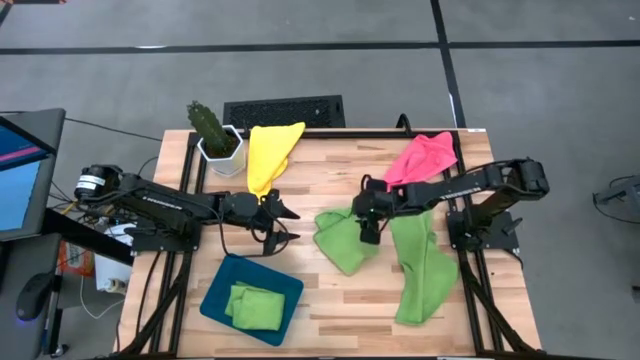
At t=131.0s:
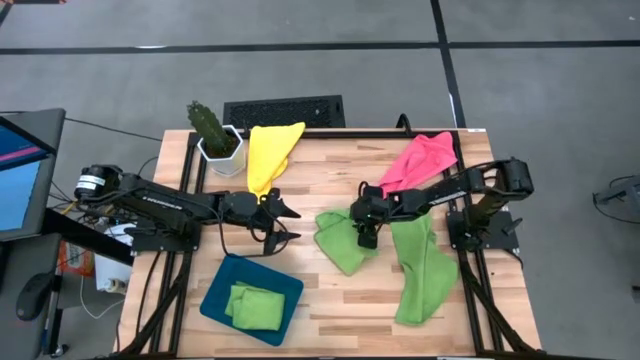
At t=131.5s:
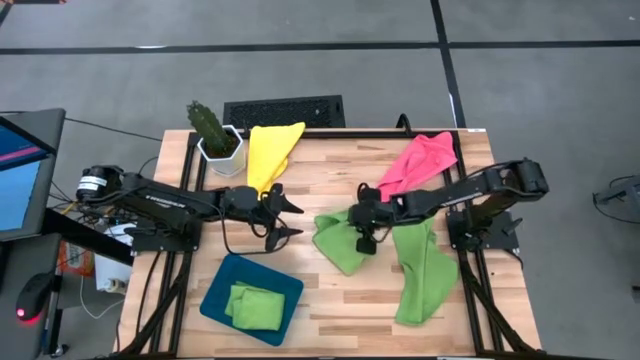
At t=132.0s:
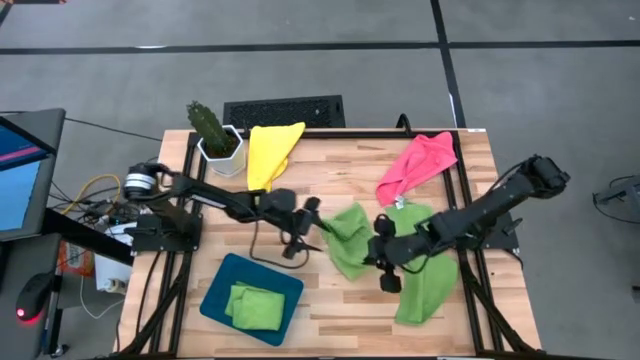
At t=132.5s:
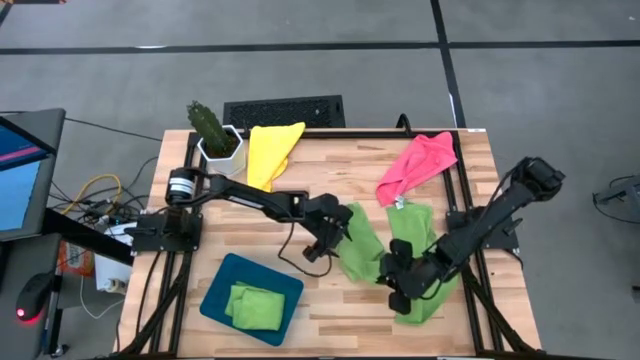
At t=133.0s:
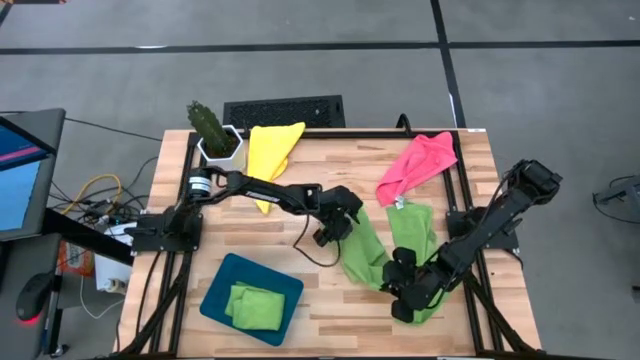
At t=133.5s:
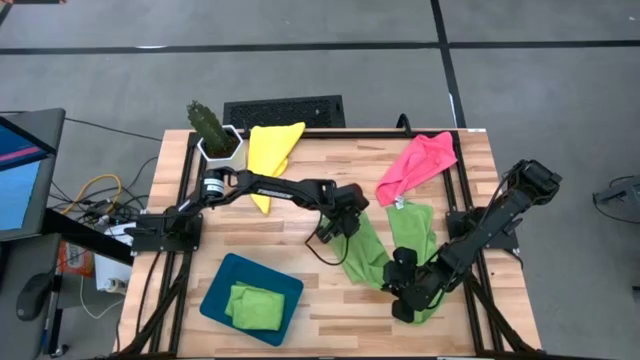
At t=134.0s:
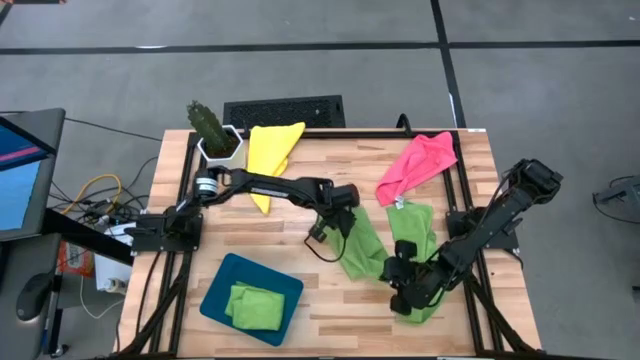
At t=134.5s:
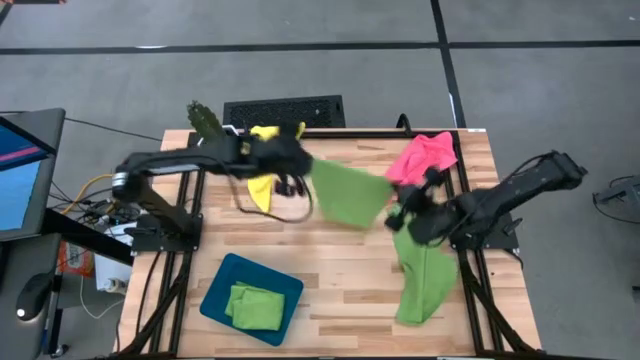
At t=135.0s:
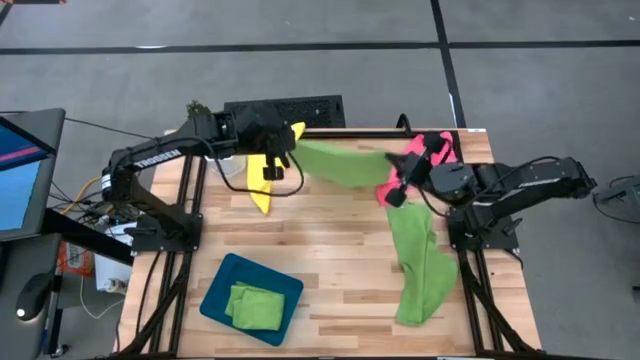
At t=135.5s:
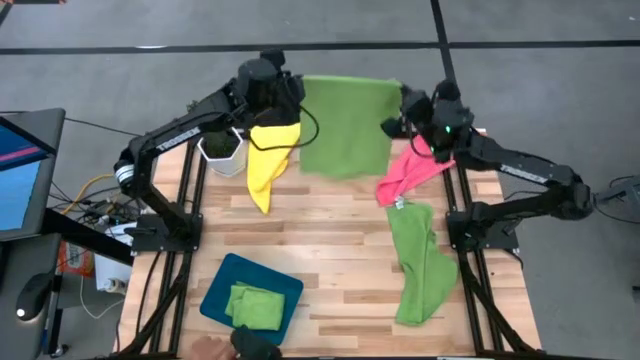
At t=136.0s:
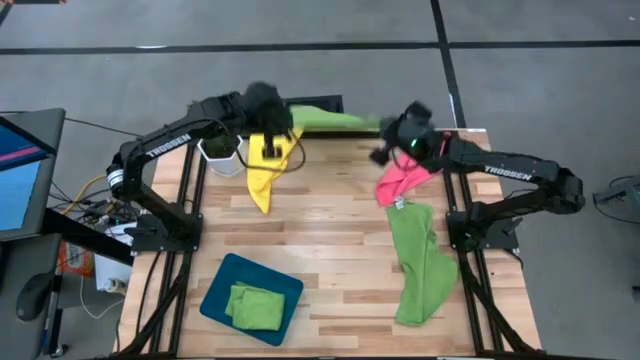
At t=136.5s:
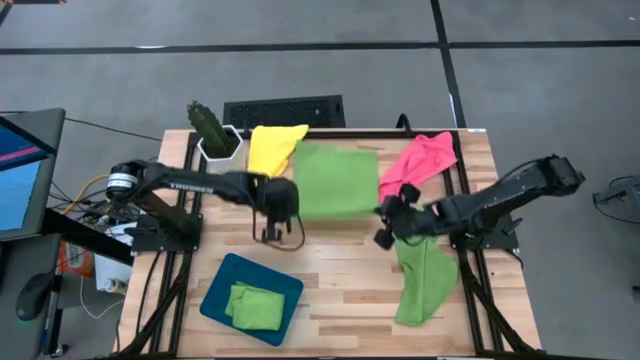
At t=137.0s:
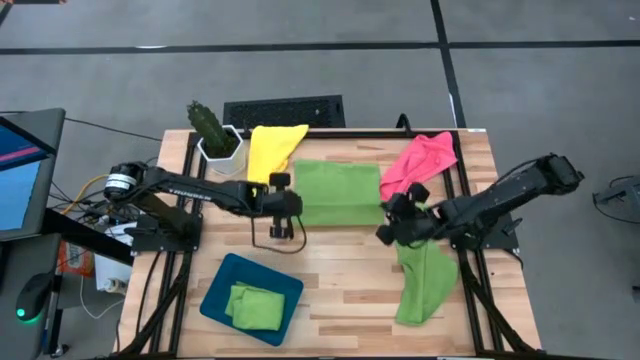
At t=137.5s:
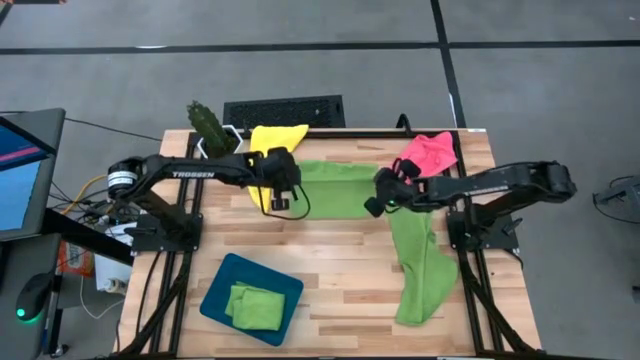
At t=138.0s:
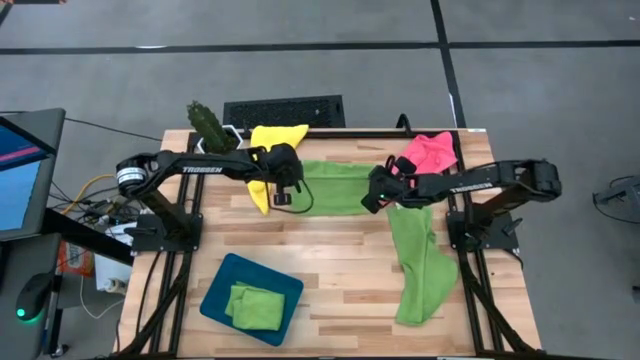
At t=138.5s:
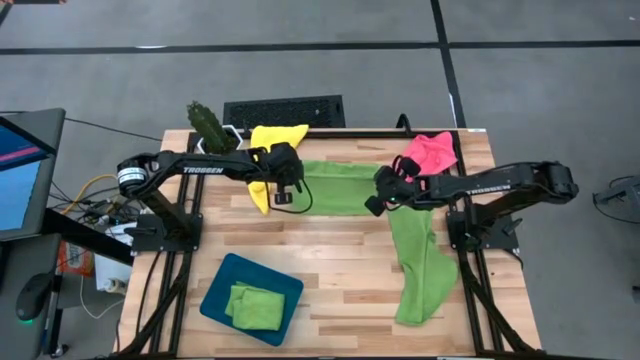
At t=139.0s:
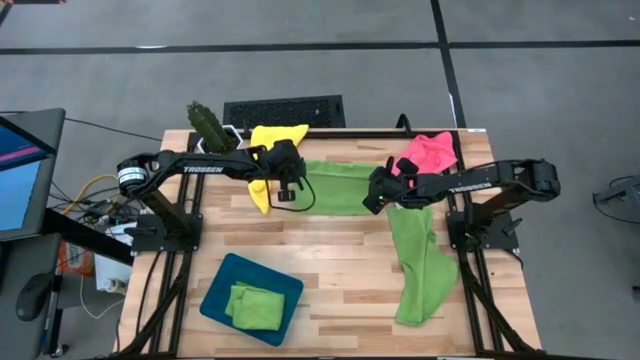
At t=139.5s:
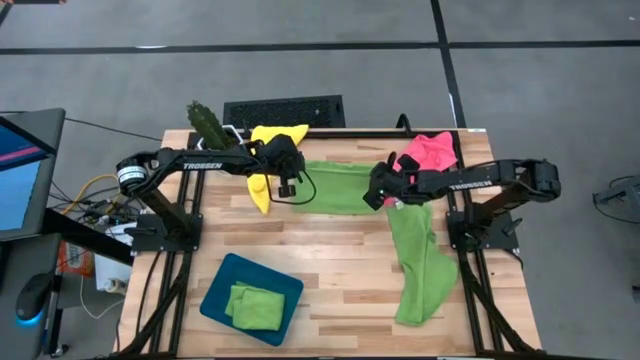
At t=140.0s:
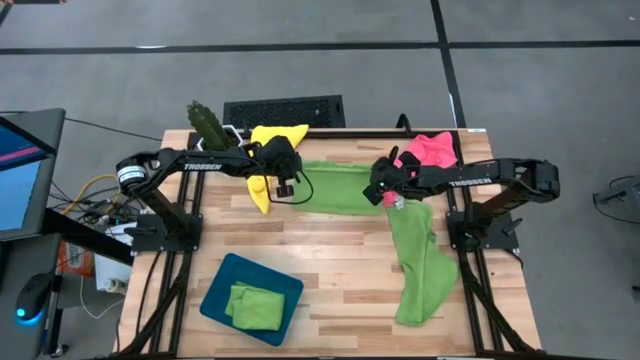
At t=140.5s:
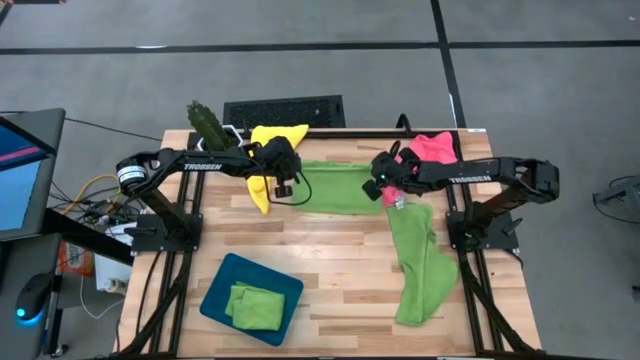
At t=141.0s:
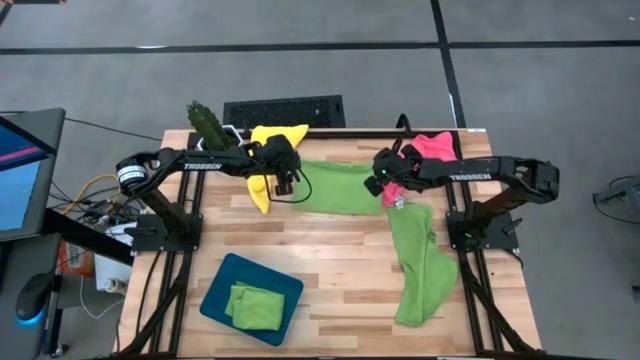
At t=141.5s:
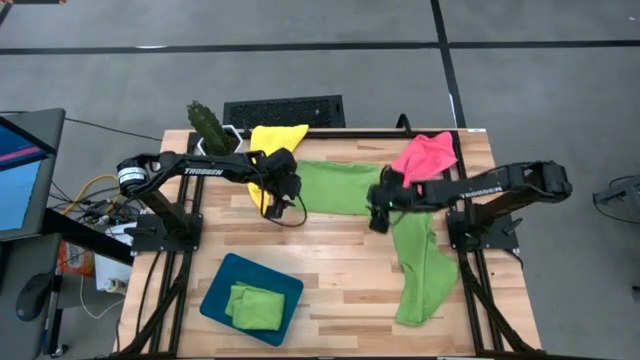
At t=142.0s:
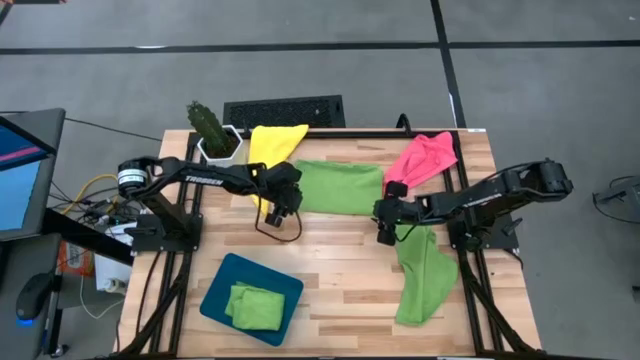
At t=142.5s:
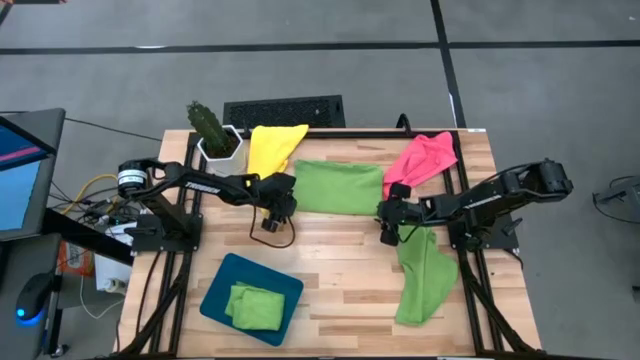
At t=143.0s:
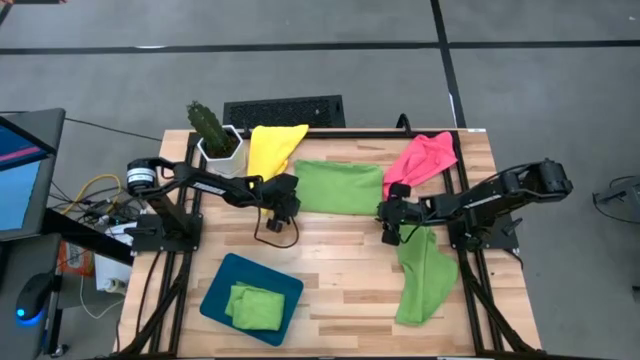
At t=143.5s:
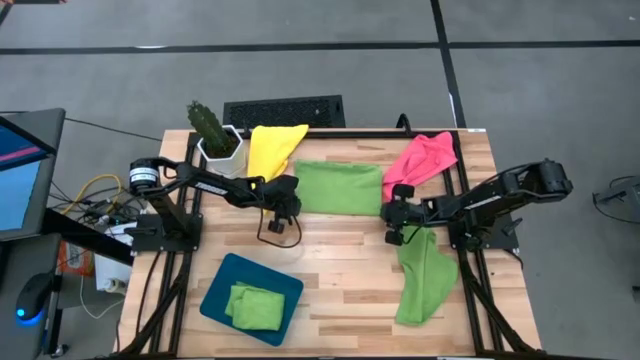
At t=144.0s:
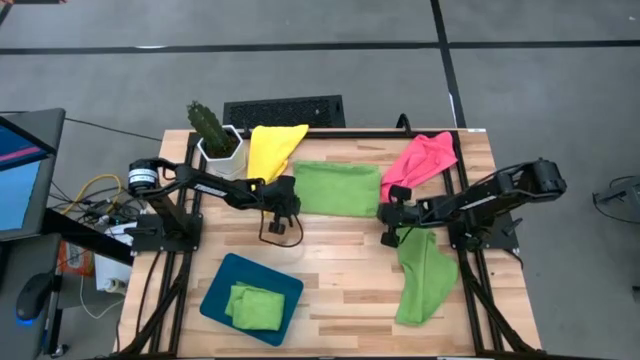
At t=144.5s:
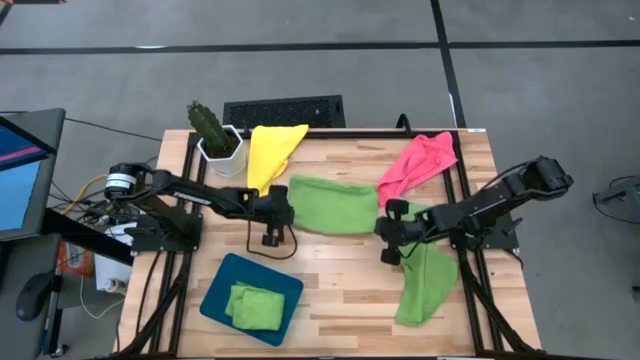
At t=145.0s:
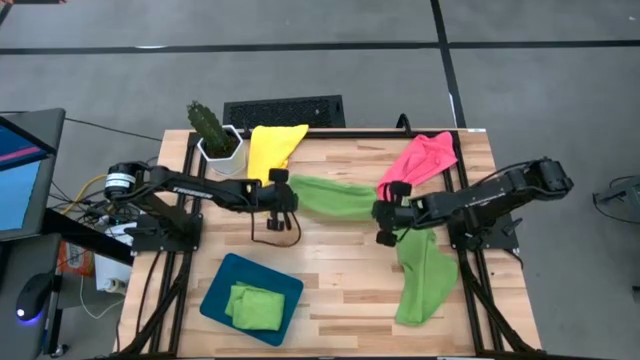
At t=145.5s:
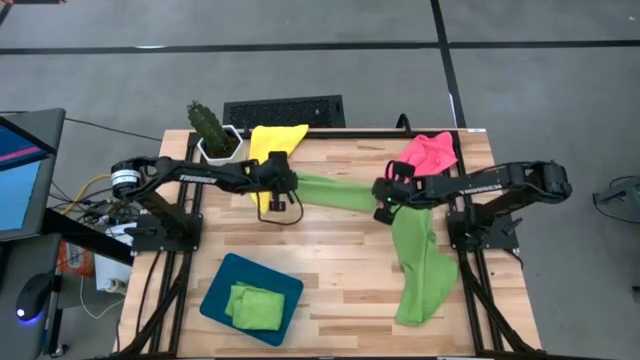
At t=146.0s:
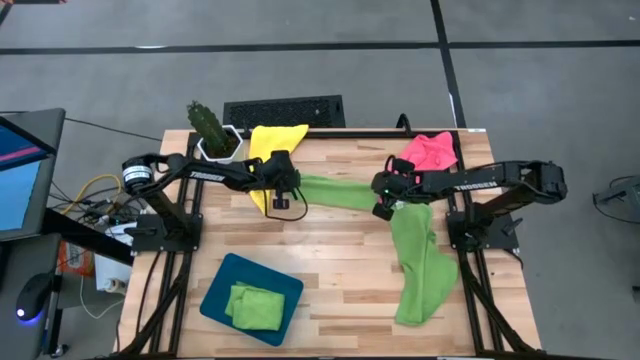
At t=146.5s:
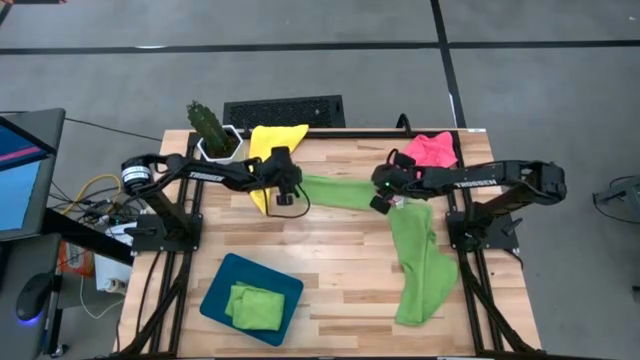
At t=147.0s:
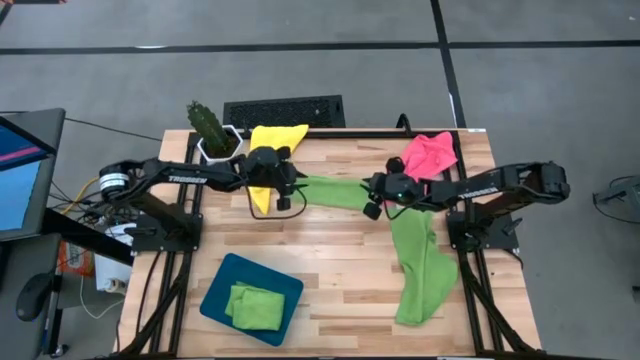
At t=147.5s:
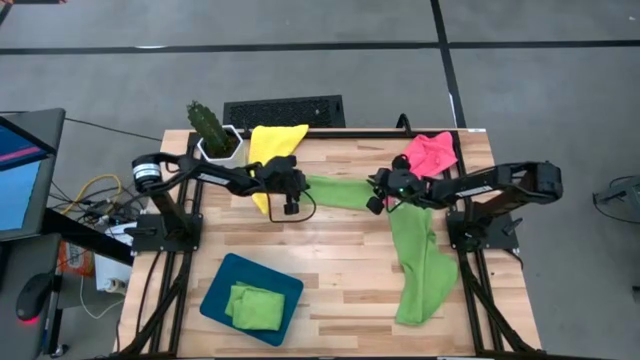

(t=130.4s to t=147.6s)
Task: Fold microfiber towels
Fold the top green microfiber

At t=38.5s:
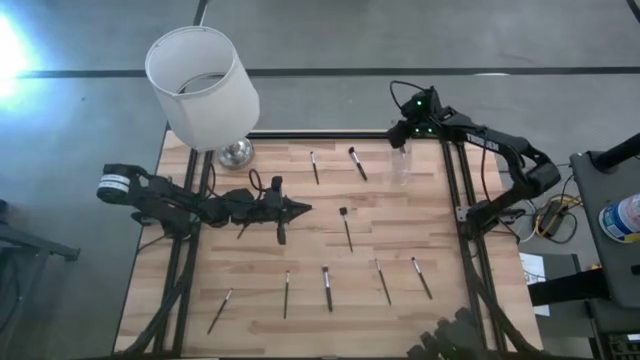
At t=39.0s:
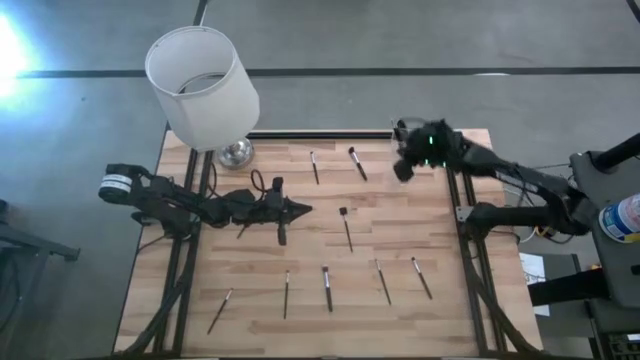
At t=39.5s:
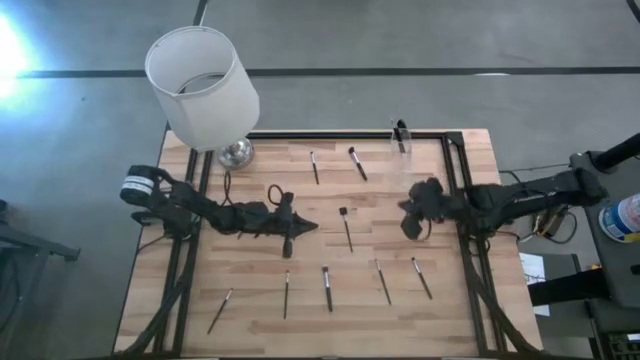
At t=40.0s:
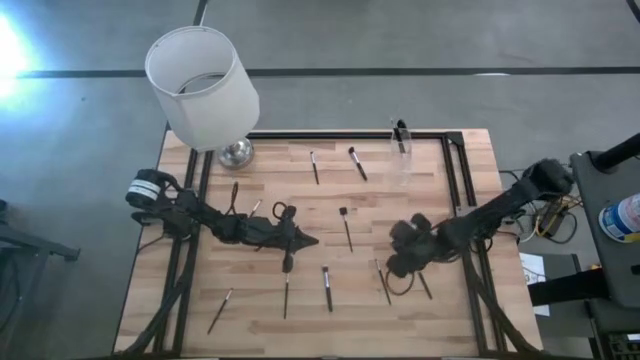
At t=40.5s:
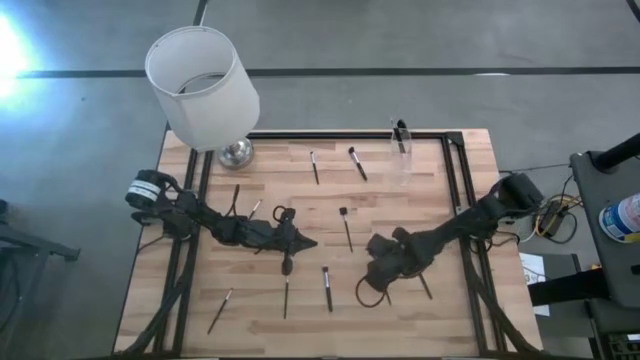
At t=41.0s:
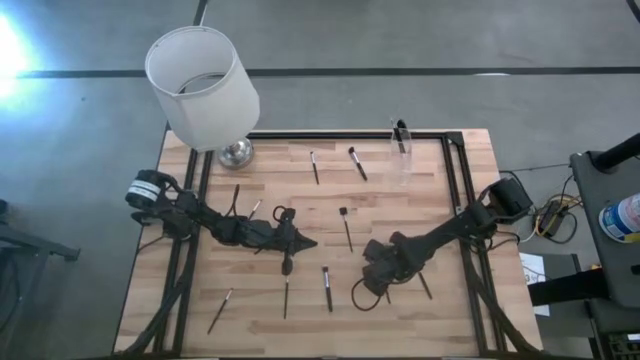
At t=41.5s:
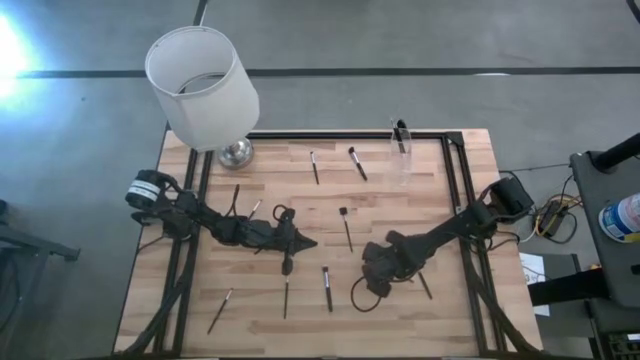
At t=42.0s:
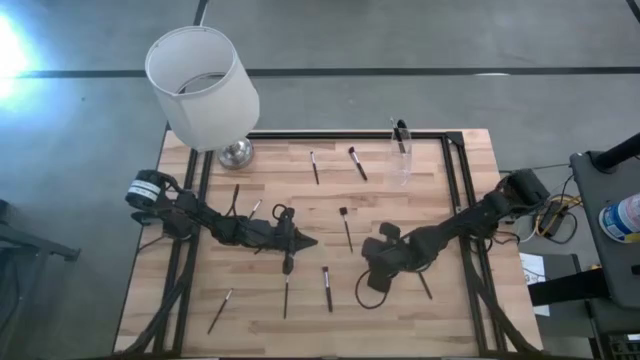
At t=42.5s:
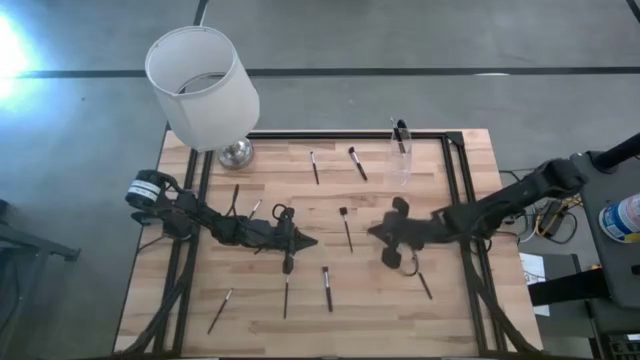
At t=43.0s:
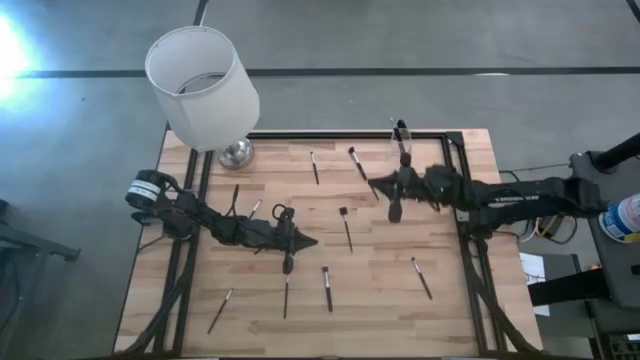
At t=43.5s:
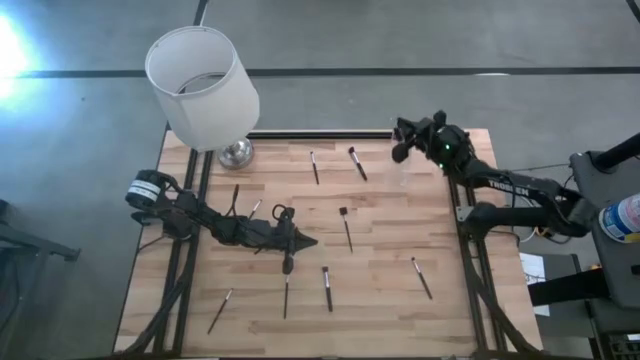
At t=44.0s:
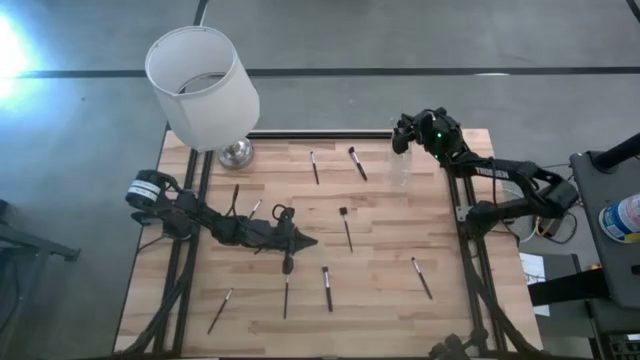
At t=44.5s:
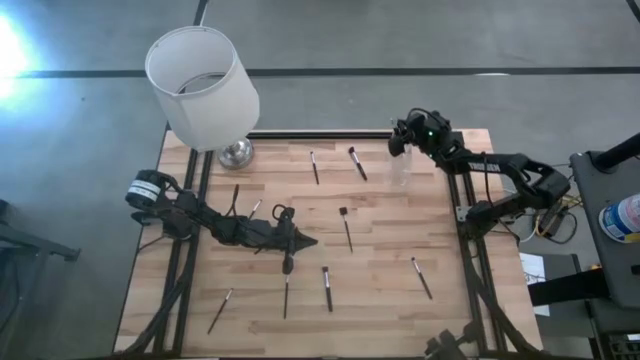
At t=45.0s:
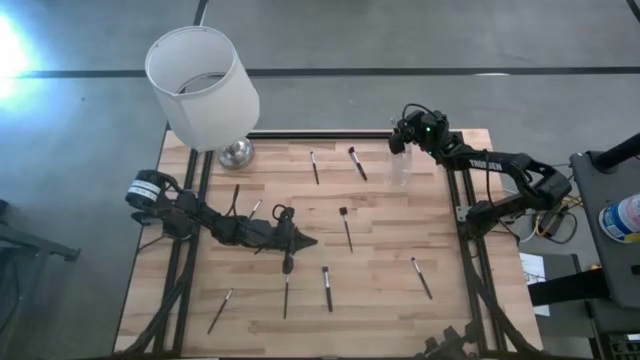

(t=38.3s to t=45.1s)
Task: Put items in baskets/containers
Put the eyeshadow brush into the transparent organizer
